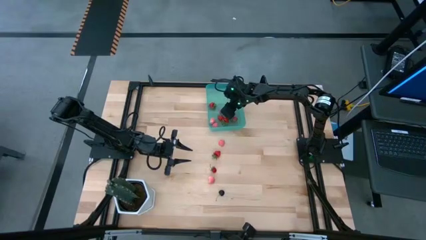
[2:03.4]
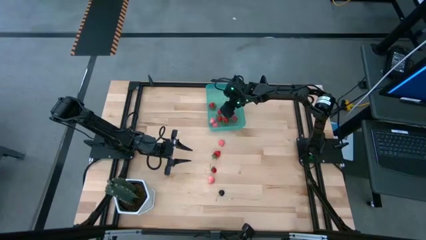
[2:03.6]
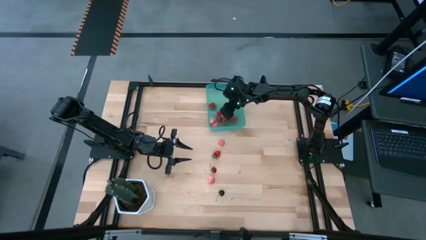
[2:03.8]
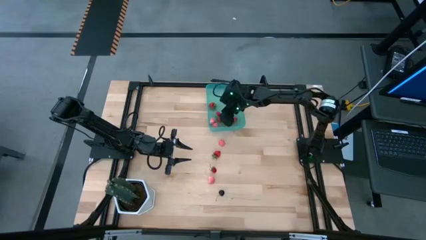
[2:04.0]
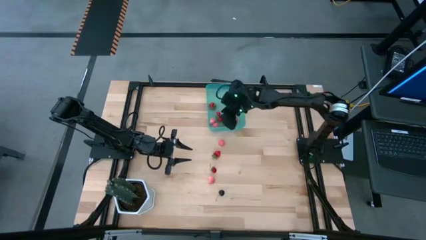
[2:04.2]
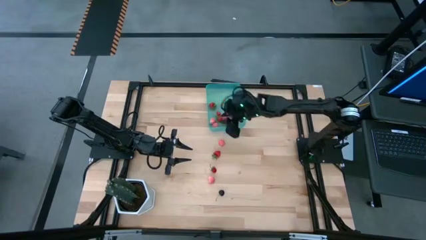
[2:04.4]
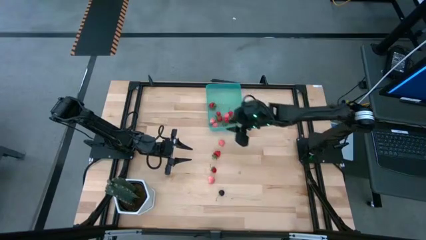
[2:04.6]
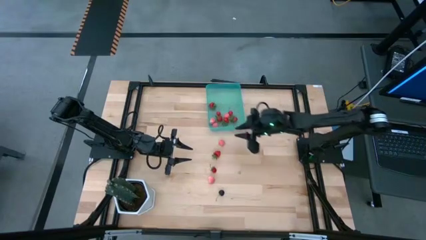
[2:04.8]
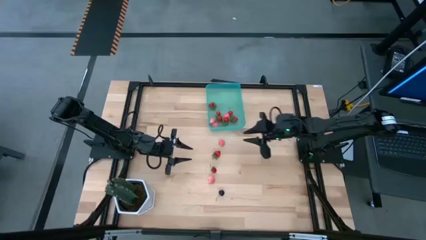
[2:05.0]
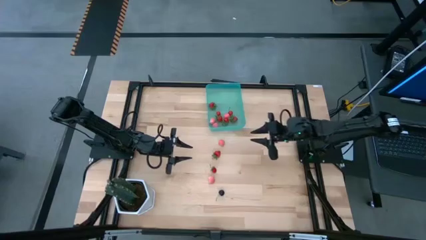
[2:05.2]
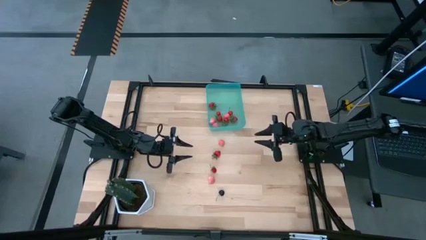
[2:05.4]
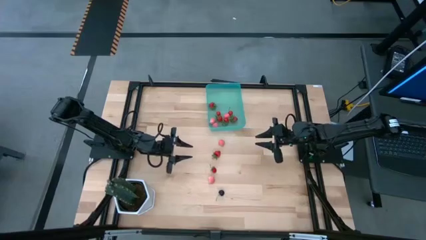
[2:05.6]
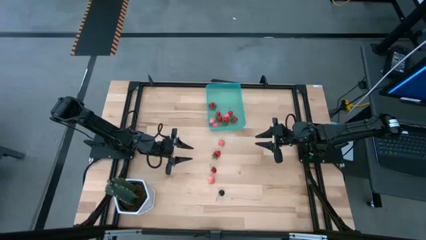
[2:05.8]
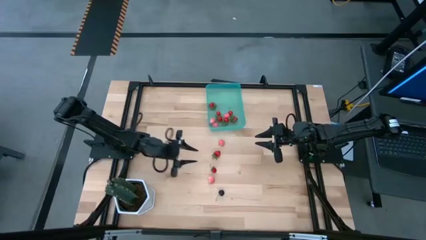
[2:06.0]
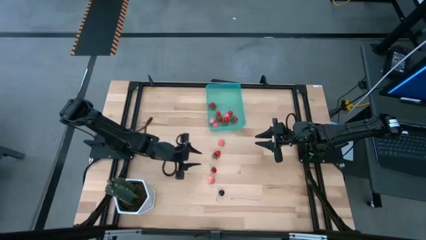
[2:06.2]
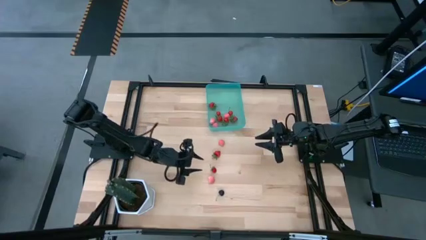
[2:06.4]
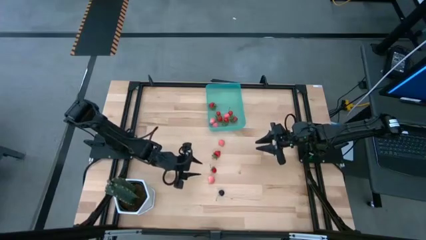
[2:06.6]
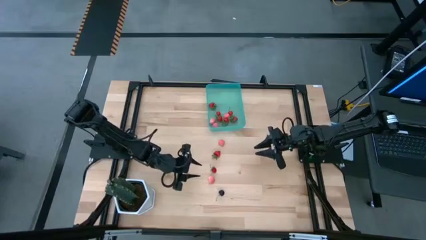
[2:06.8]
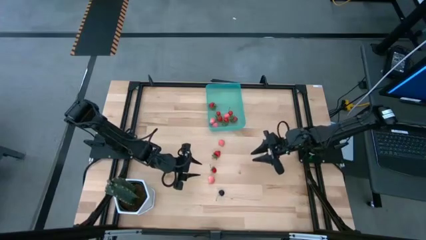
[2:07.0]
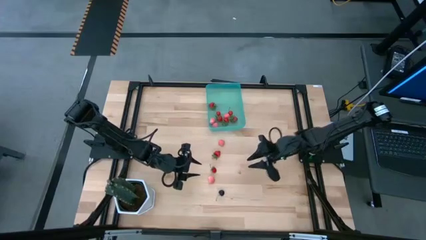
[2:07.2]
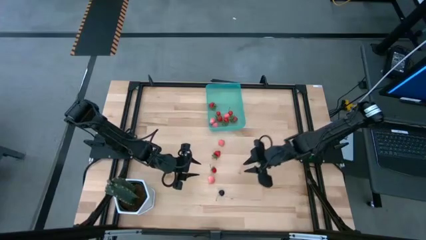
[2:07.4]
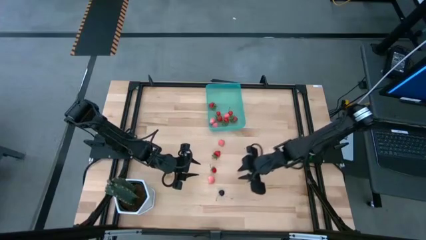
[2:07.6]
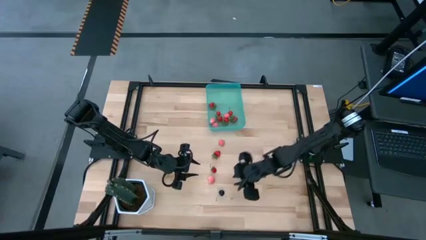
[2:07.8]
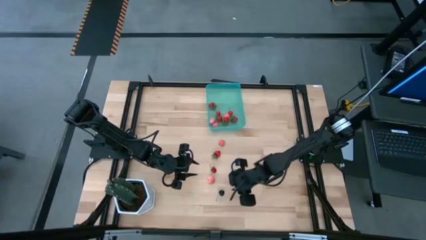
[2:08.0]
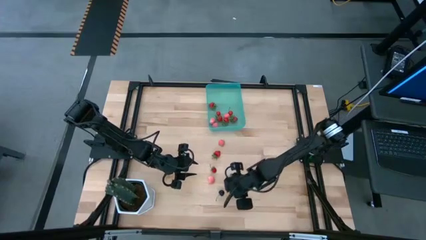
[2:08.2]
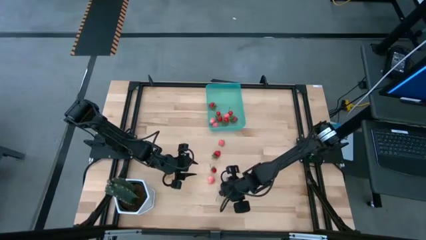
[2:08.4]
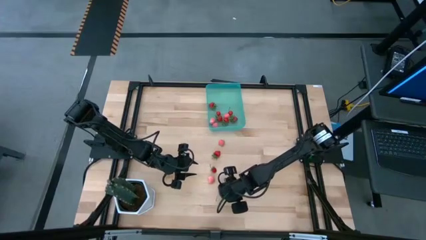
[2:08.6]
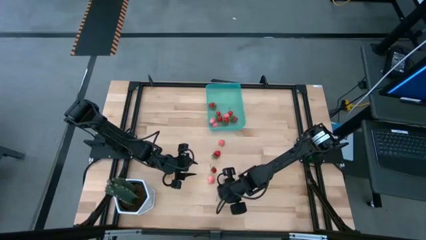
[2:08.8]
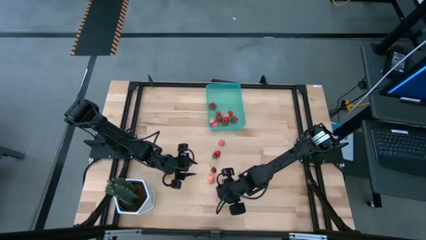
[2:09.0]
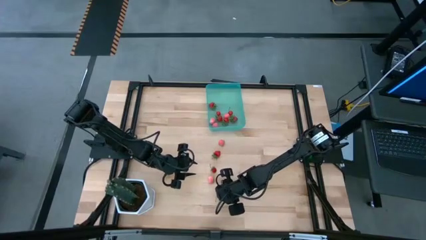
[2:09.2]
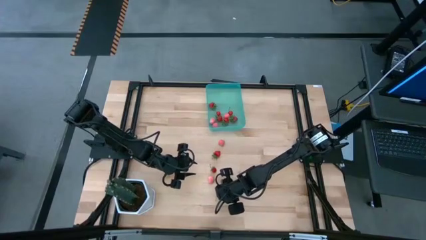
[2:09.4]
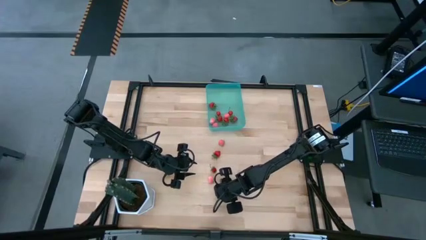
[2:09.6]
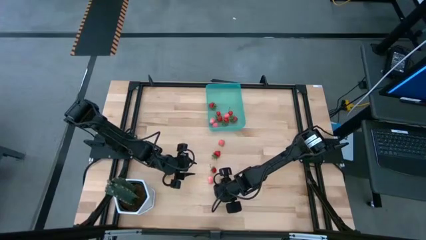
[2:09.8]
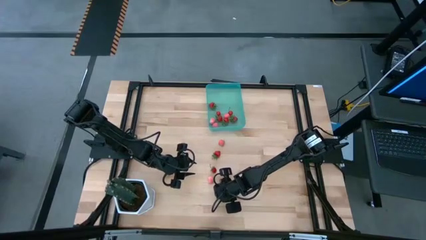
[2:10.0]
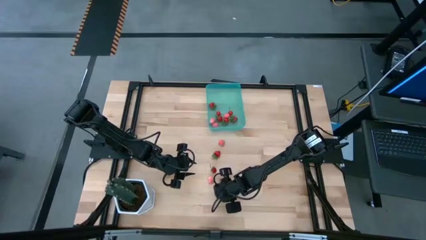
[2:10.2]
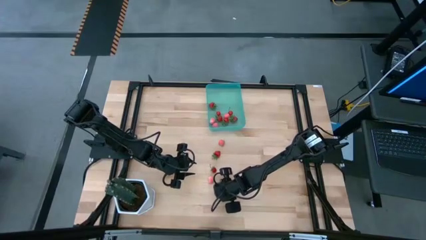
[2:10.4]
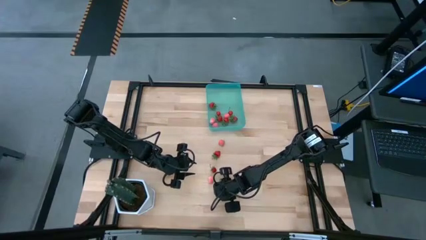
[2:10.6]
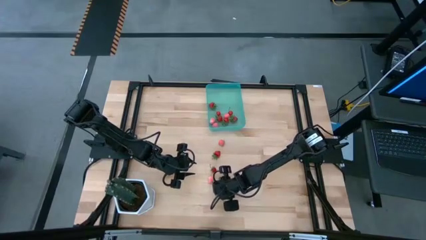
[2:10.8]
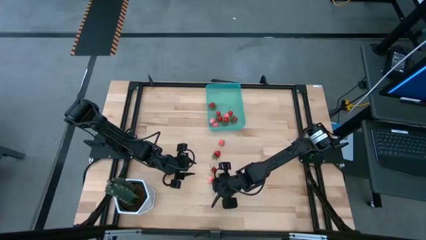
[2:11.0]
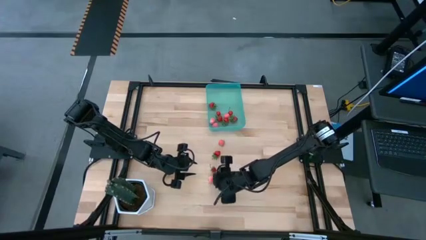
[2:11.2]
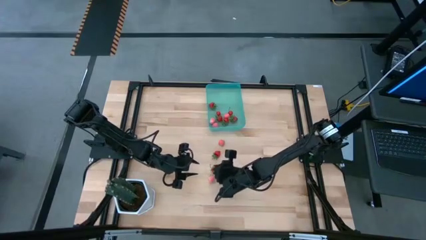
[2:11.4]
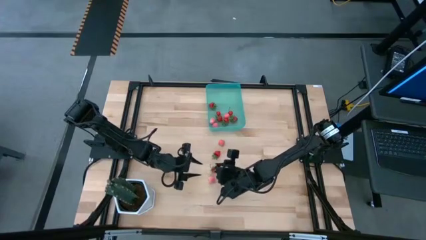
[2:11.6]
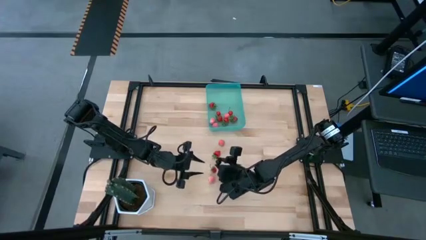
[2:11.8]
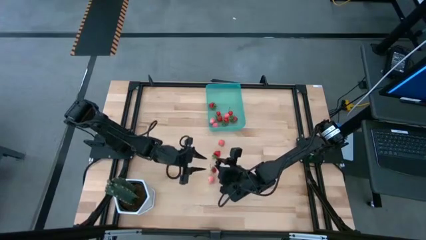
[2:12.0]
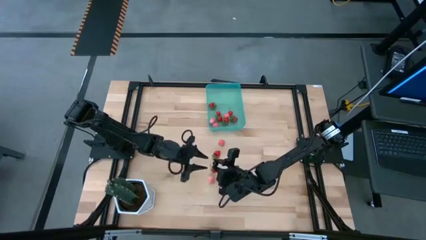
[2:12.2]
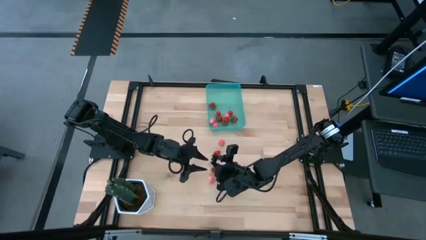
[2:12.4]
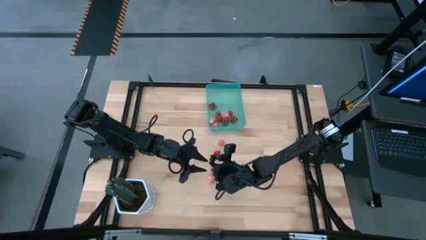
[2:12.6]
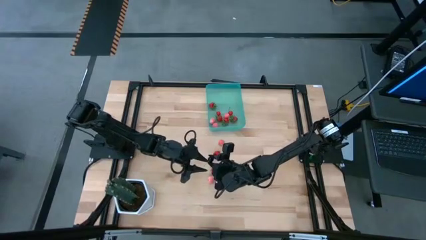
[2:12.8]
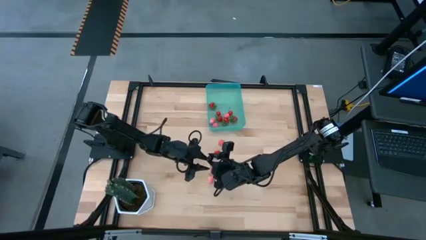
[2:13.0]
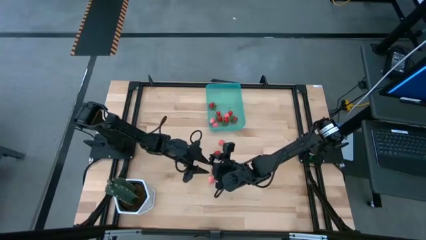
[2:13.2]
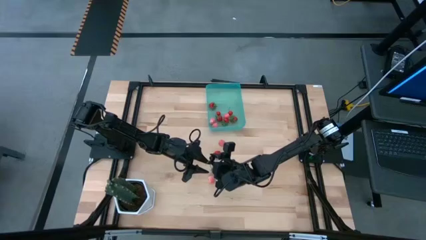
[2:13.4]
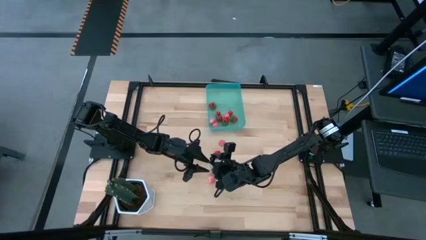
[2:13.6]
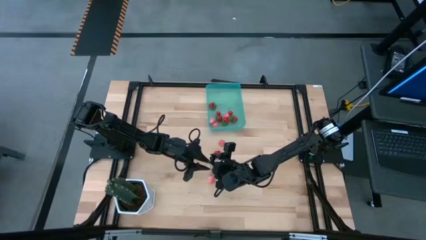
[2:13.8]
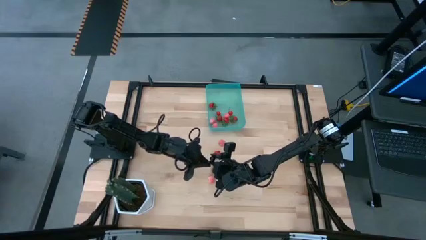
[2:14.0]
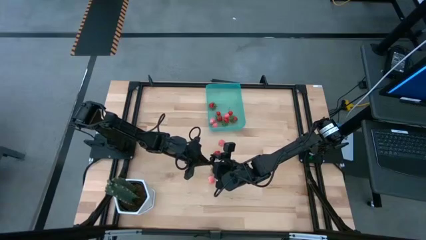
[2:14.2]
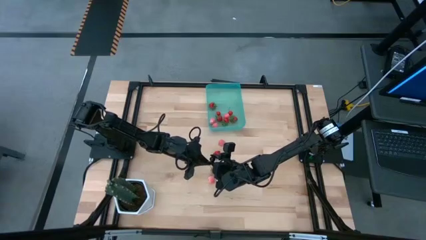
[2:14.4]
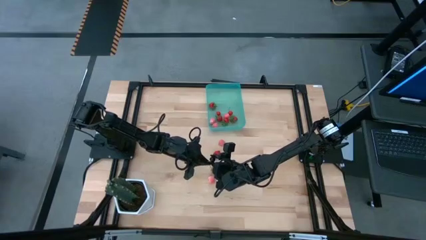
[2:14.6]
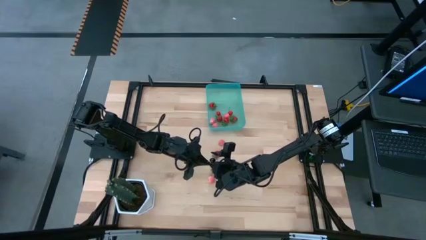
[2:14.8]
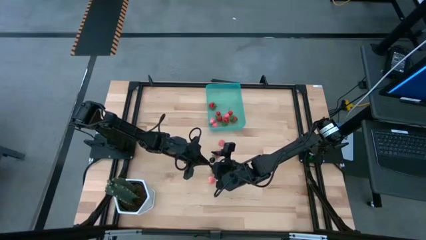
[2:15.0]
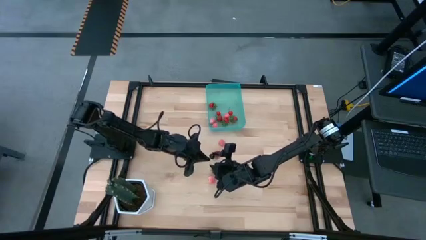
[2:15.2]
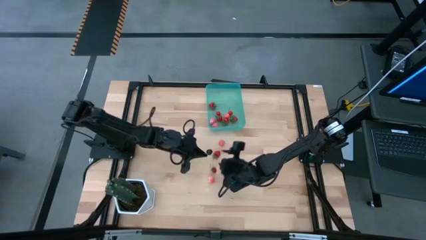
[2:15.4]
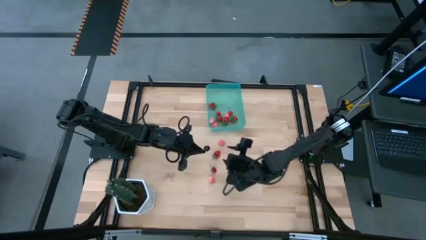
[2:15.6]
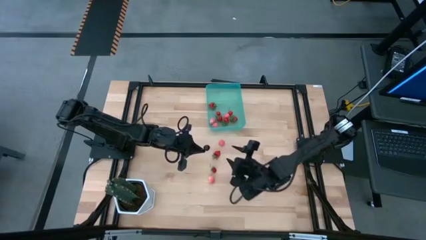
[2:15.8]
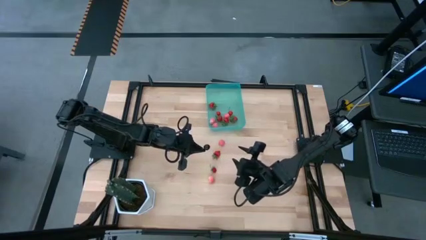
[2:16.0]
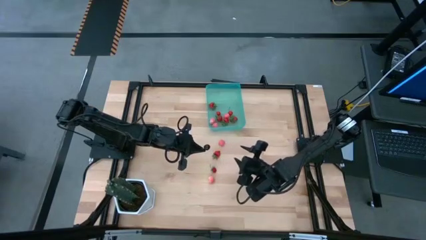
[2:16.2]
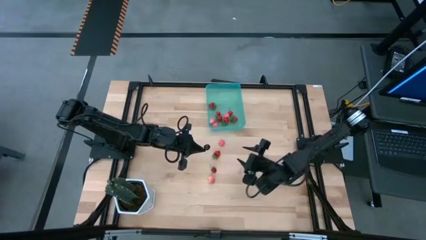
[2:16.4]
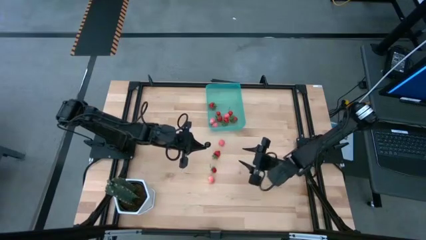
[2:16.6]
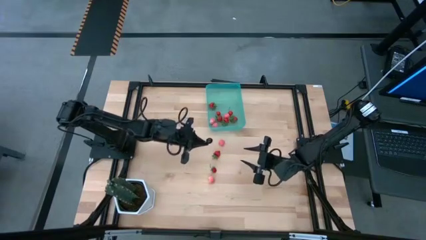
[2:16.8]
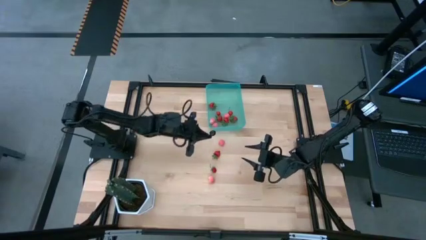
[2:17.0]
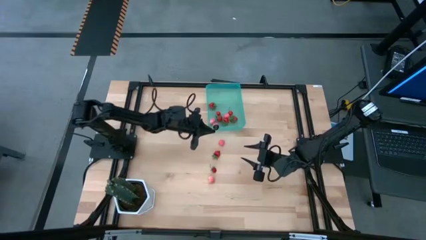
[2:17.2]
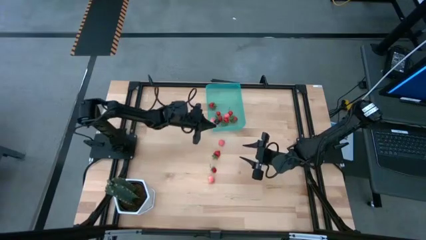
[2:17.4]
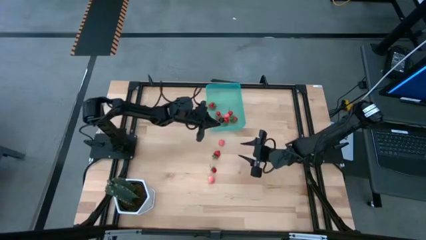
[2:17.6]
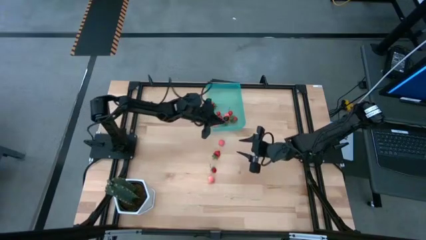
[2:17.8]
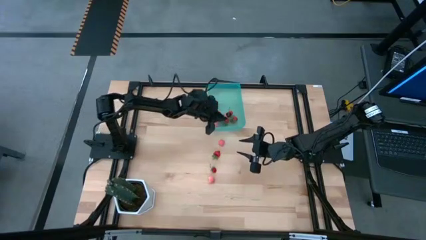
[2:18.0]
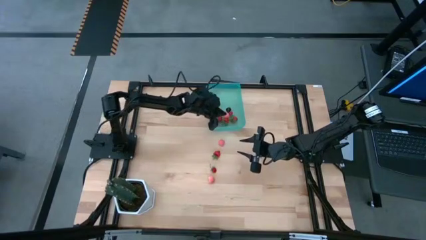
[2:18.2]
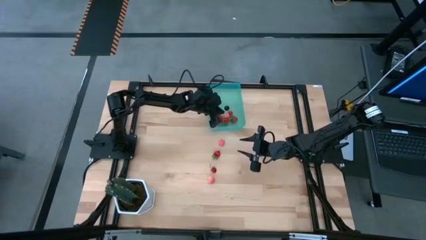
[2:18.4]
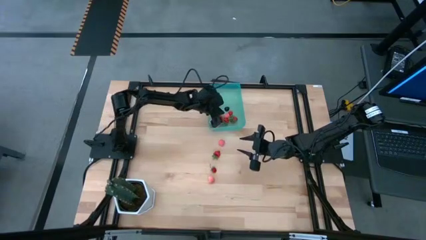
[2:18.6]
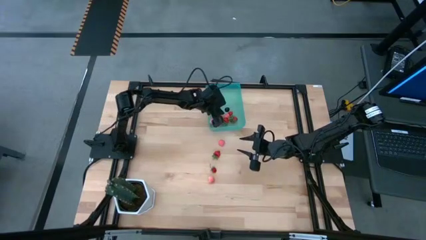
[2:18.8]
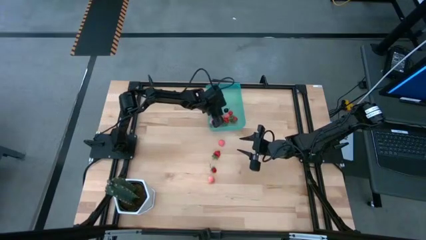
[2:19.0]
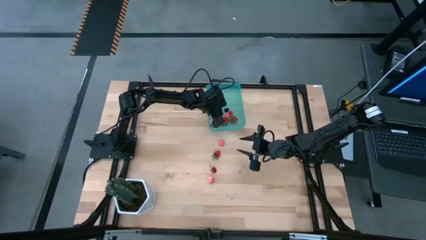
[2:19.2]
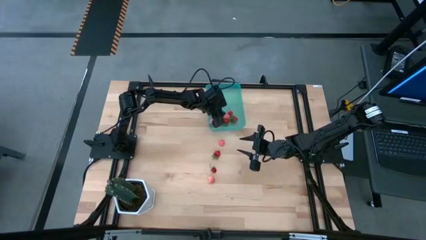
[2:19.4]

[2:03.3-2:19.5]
Task: Pick and placing Produce into tupperware
Put the black cherry into the blue bin
